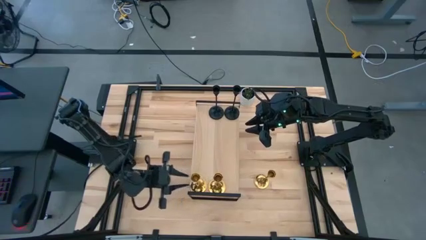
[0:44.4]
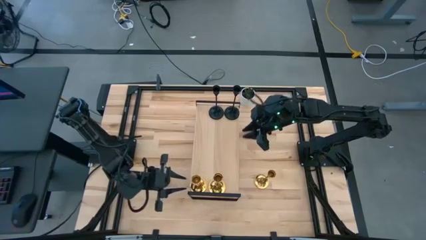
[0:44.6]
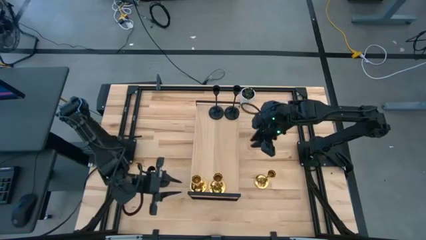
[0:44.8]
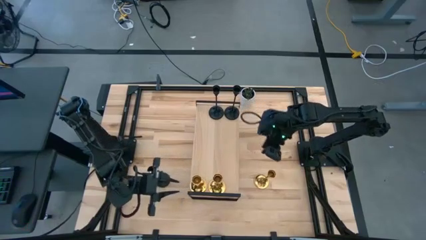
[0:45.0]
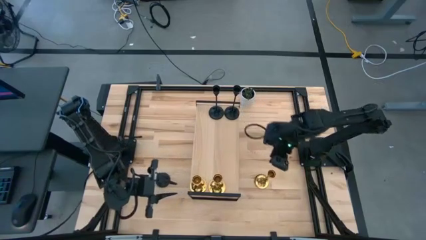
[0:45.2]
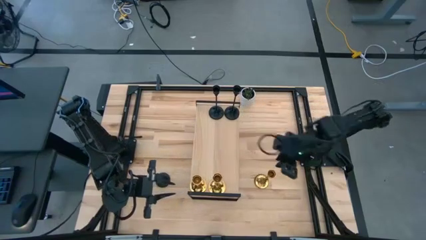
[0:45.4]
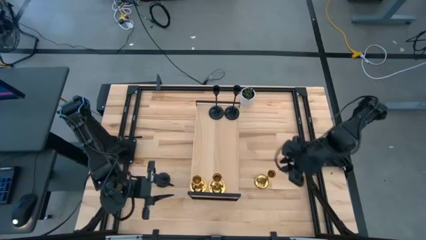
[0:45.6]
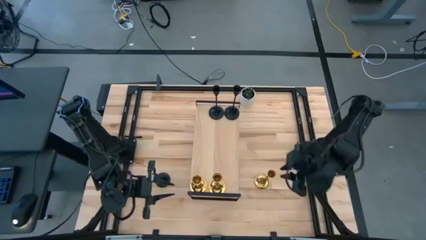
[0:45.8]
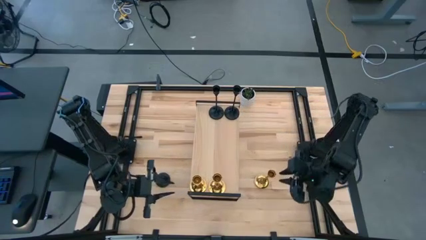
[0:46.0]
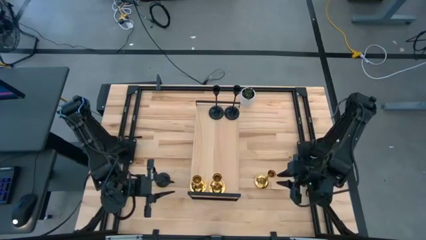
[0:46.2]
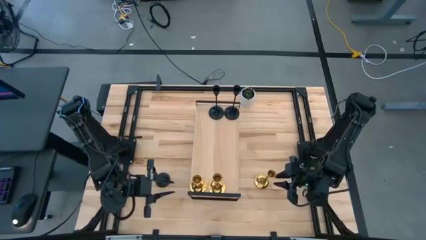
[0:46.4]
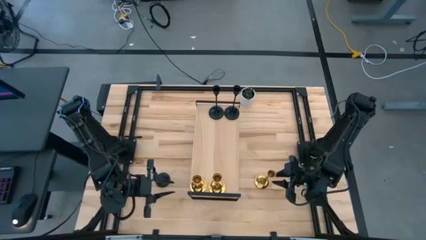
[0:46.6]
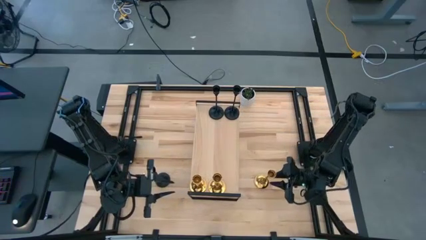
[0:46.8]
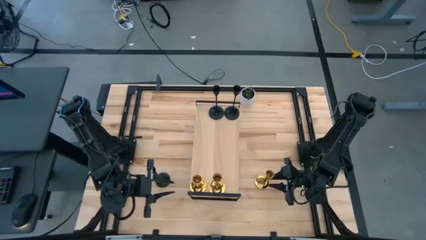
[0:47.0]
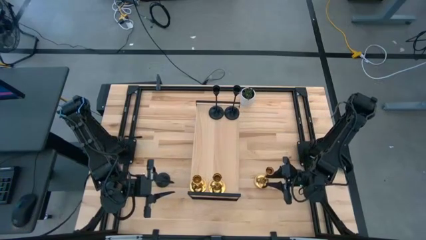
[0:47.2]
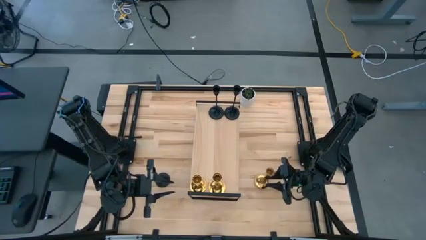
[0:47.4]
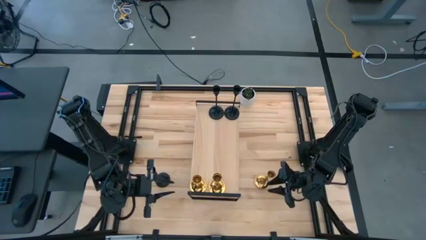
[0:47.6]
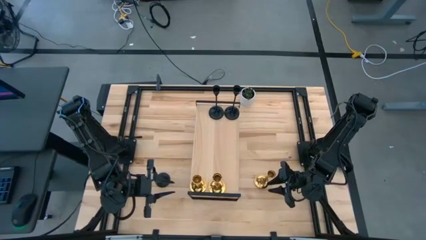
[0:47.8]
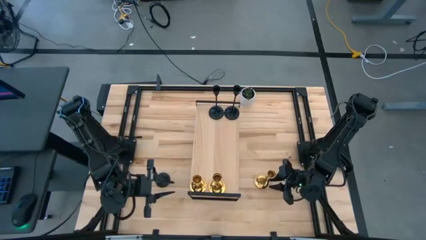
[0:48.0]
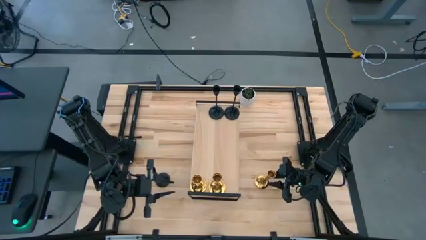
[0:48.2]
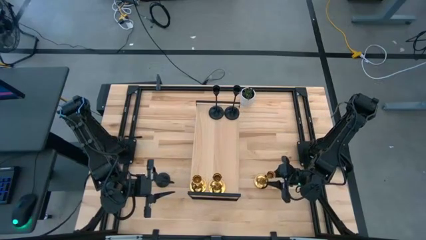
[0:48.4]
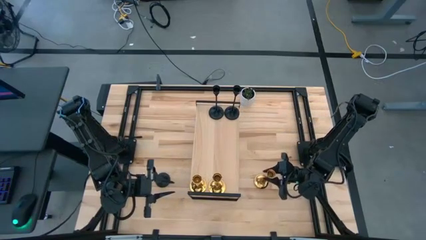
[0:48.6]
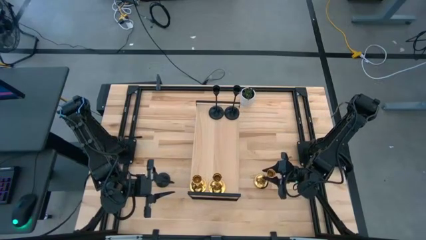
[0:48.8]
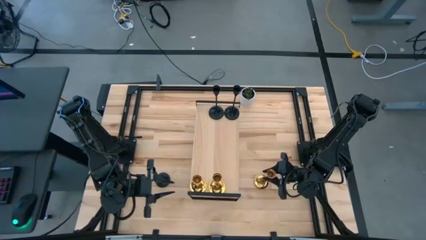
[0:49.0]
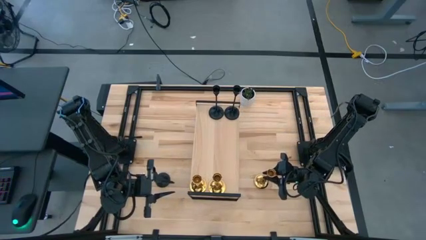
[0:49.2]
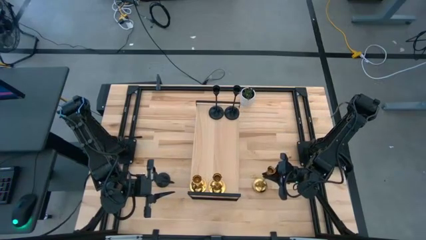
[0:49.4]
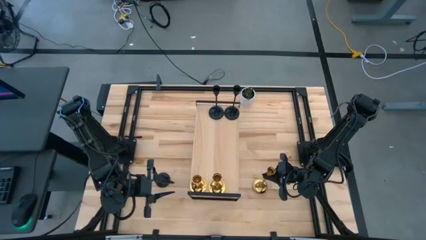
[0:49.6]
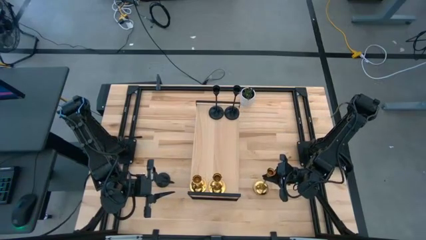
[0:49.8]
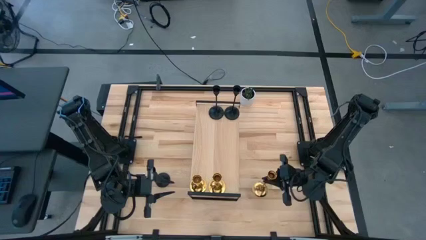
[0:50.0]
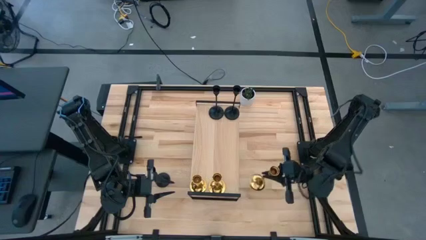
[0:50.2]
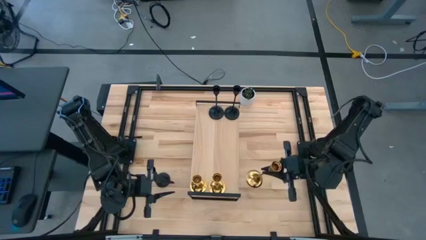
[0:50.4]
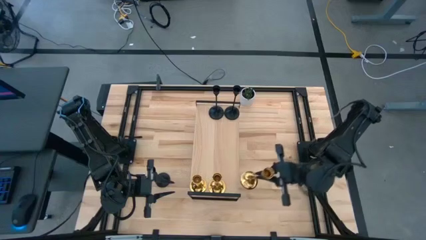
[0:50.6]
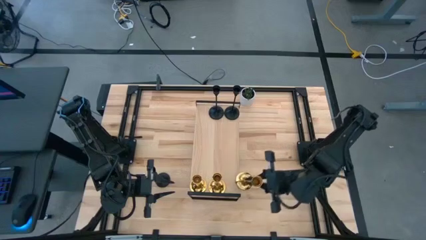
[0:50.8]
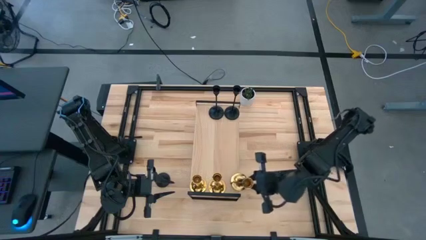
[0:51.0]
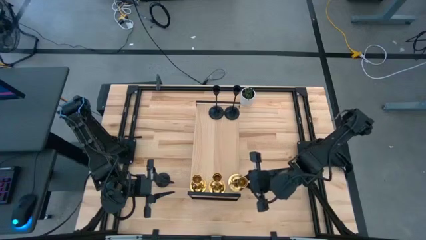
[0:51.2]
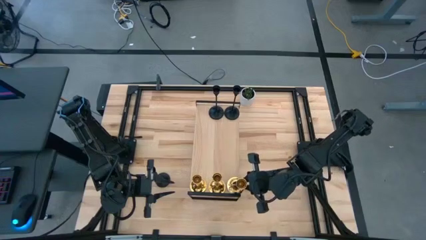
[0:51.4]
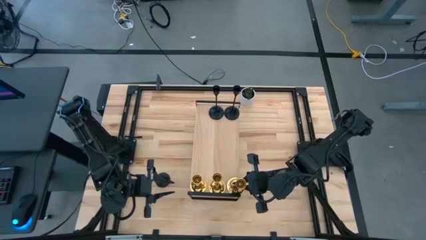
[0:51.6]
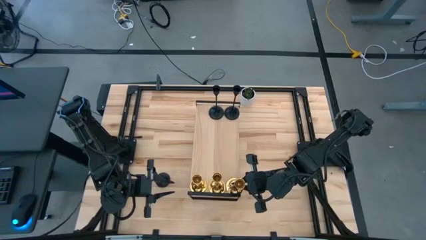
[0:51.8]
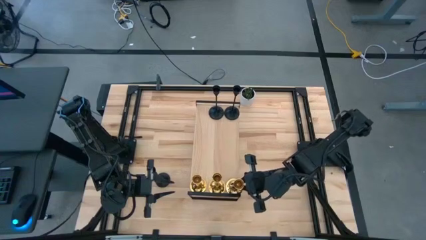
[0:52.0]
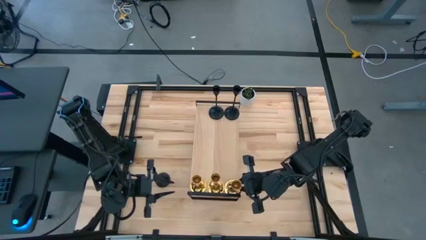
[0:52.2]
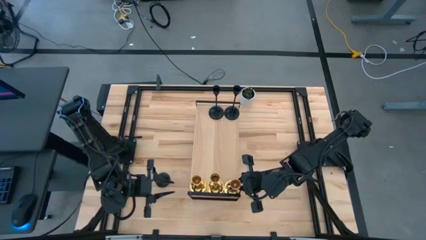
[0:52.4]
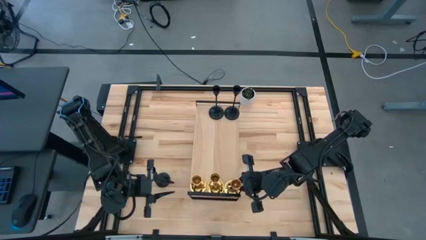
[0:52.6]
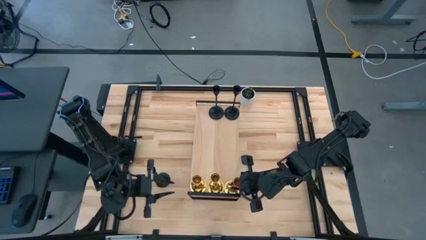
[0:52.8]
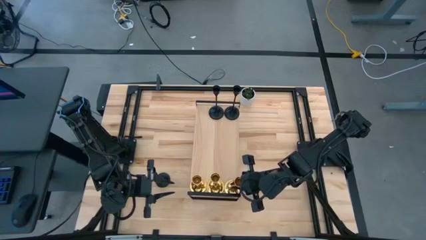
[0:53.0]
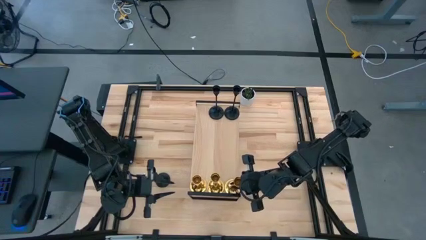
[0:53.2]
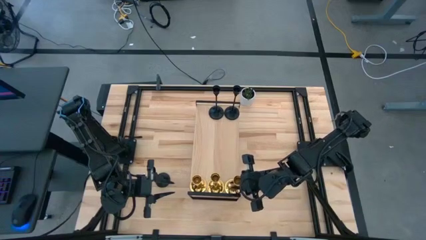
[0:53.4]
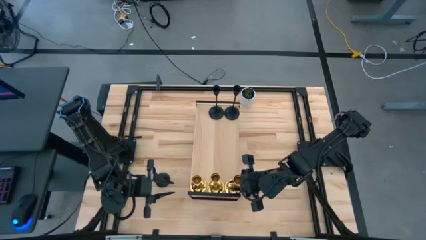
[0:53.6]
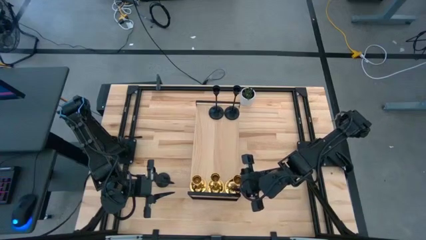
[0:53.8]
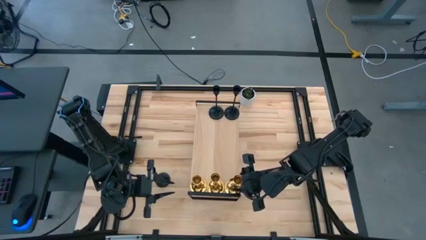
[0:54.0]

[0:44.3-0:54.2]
Task: Pick & Place candle stick holders
Align the golden candle holder with the other golden holder on the shelf

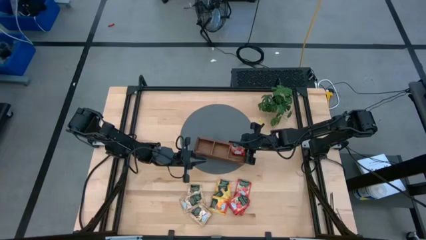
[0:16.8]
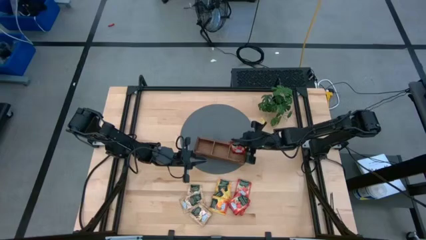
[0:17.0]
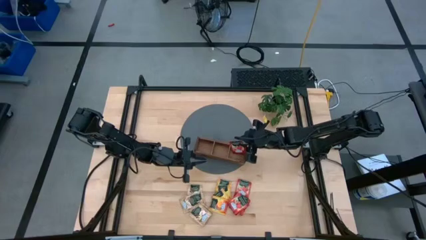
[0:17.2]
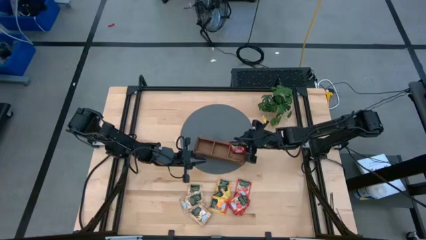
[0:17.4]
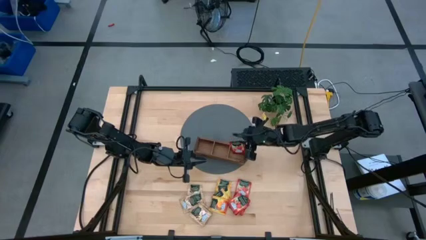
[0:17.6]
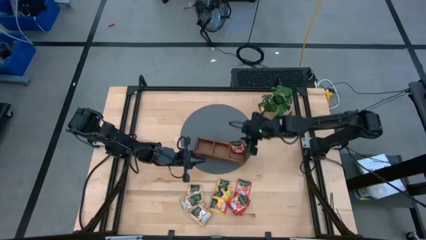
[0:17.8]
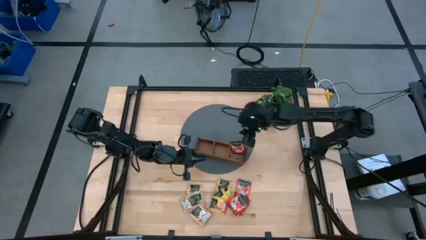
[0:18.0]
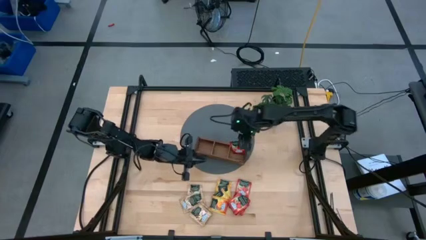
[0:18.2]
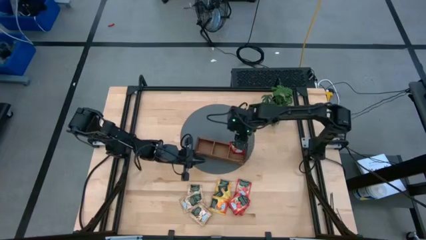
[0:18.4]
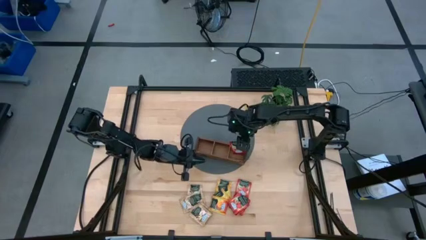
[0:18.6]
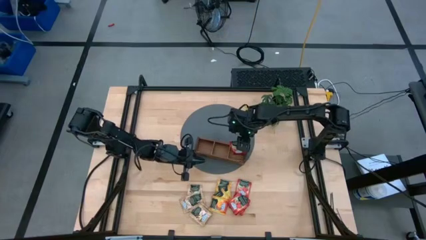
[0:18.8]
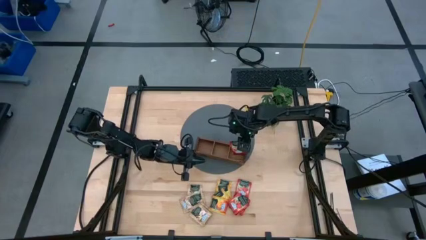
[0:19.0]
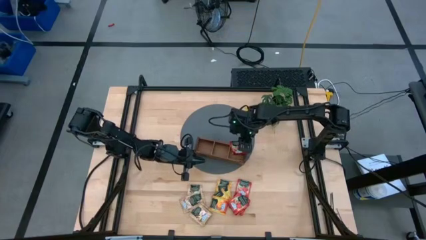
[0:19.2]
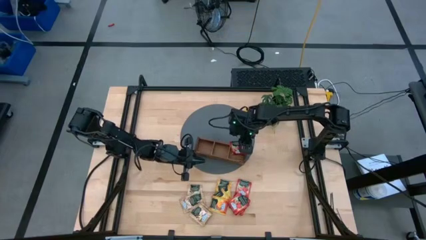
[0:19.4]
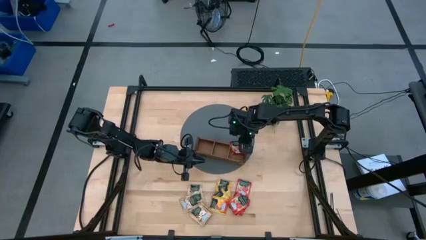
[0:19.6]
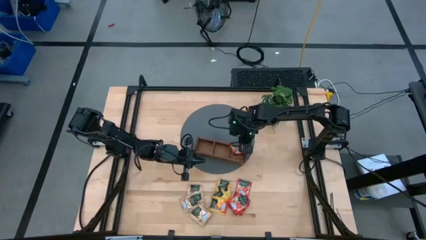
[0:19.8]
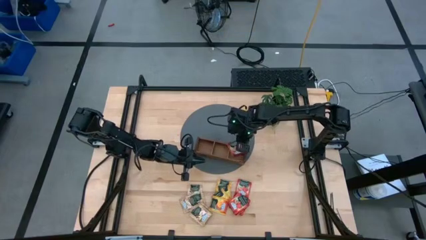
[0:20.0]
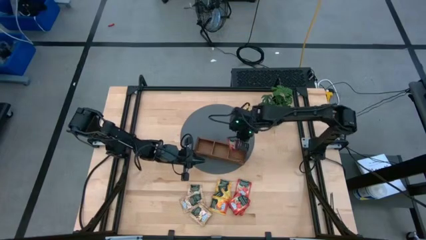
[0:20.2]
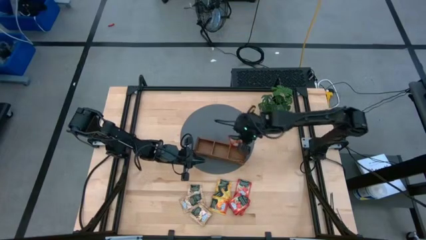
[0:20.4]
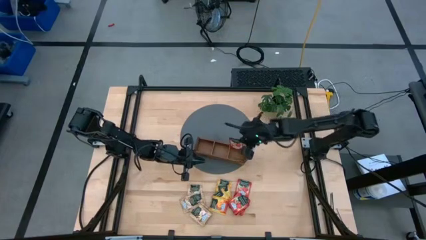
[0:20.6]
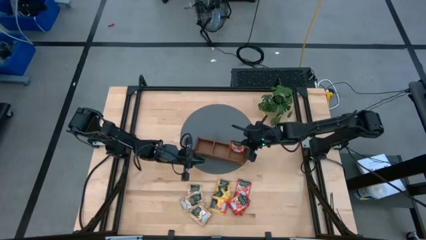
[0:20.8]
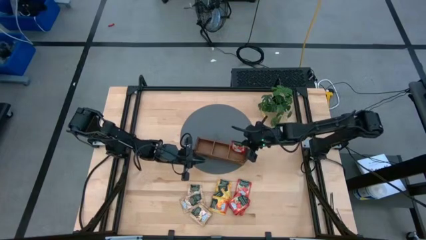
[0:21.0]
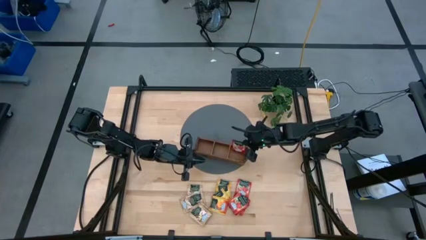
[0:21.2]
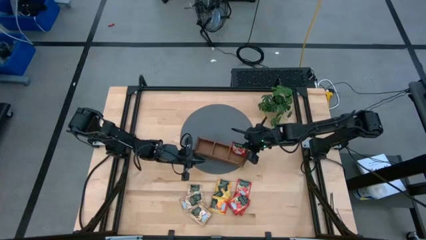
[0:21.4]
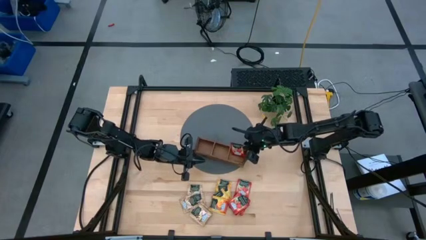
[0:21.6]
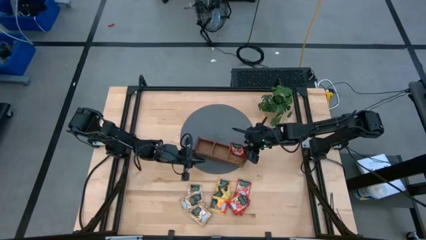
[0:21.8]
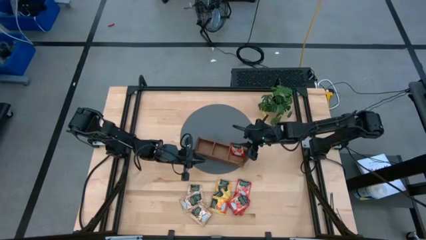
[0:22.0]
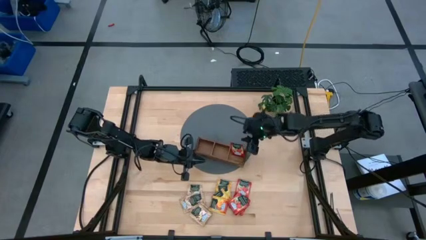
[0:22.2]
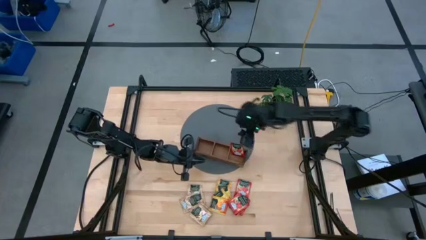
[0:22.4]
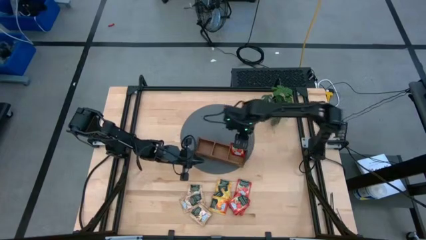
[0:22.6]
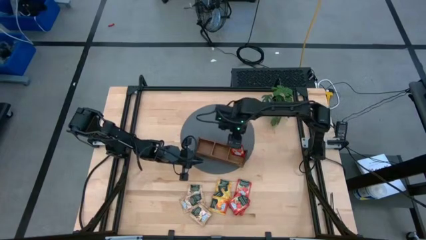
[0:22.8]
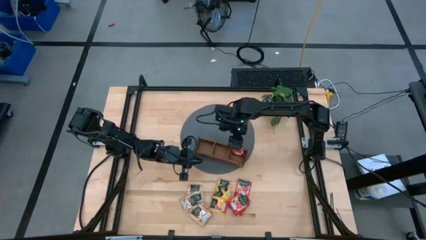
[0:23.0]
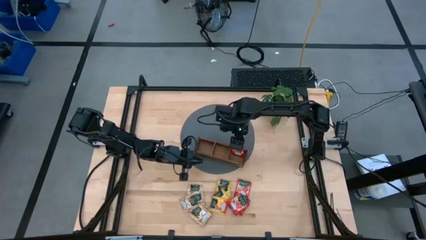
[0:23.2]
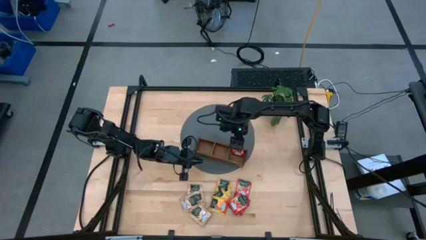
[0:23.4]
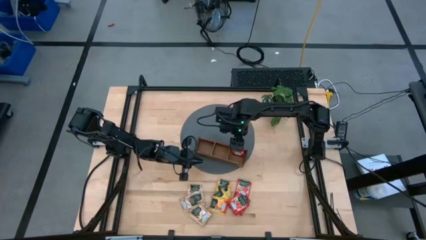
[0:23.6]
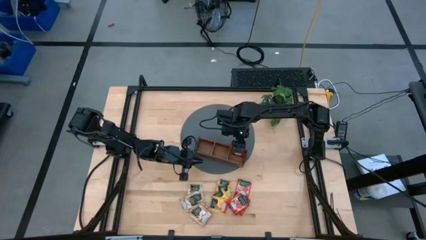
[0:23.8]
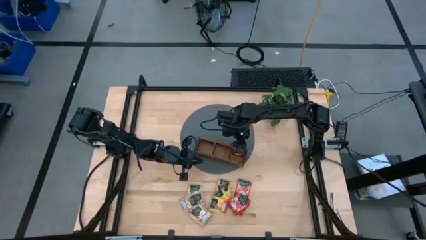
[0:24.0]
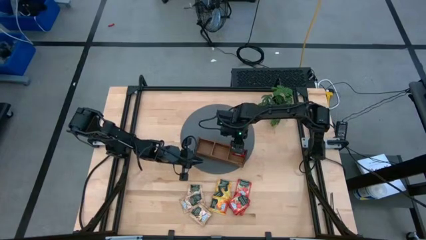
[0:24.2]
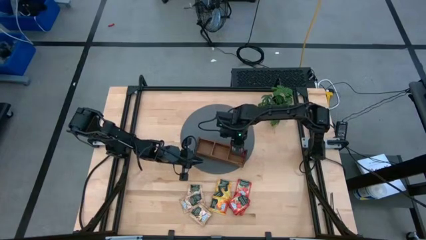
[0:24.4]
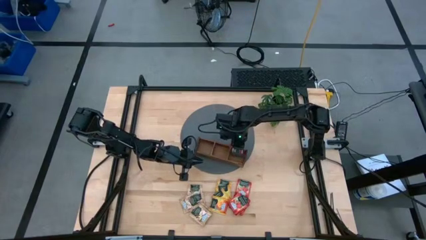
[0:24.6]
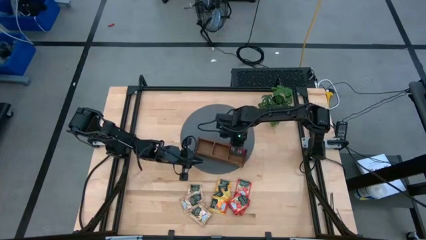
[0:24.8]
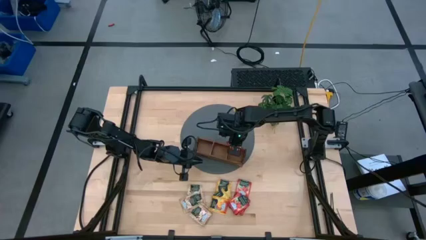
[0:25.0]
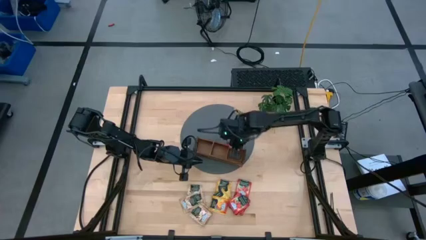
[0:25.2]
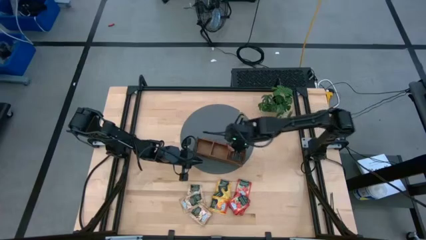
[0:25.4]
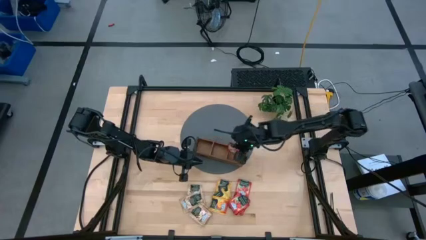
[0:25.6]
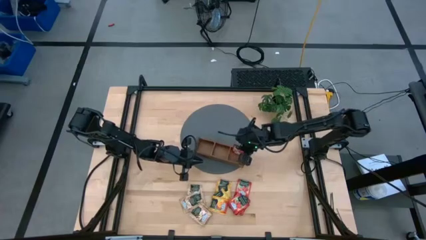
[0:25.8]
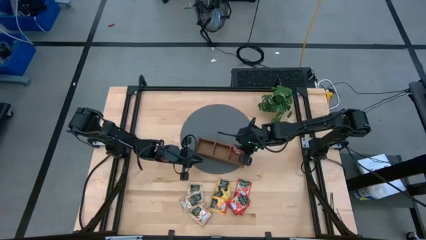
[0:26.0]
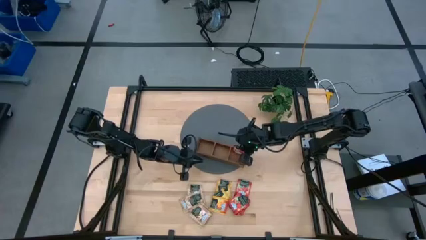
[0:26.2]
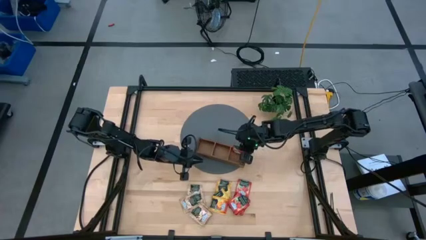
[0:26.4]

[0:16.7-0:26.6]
Task: Pick & Place Tea
Put the red tea bag into the right section of the wooden organizer
